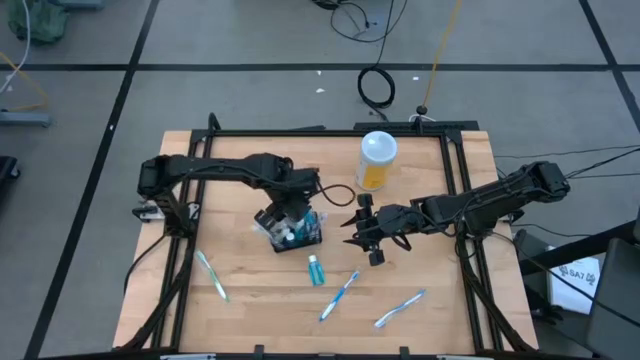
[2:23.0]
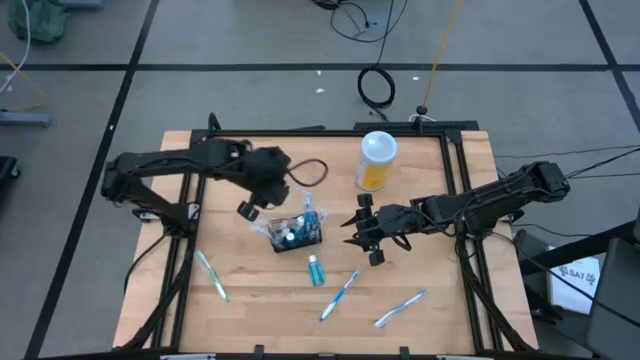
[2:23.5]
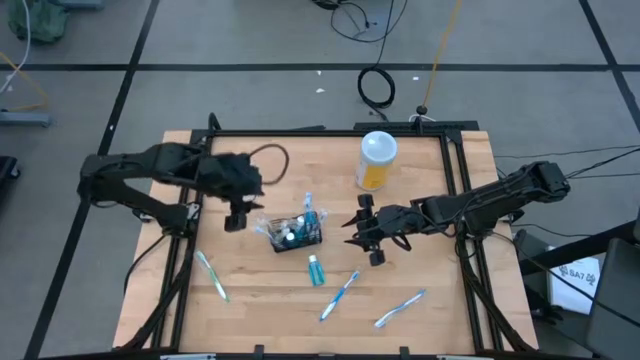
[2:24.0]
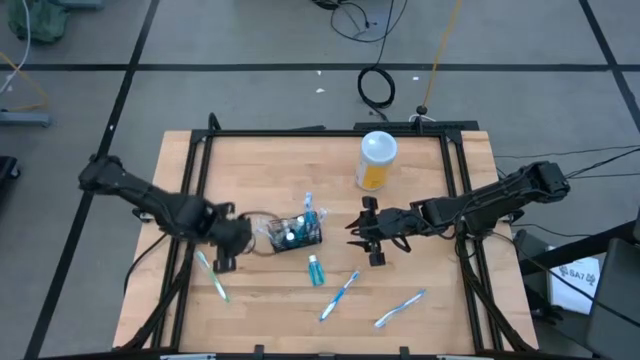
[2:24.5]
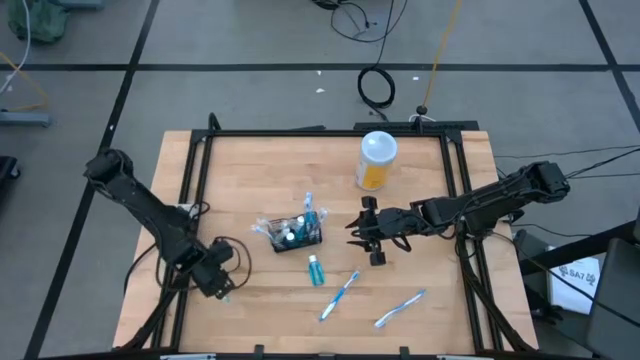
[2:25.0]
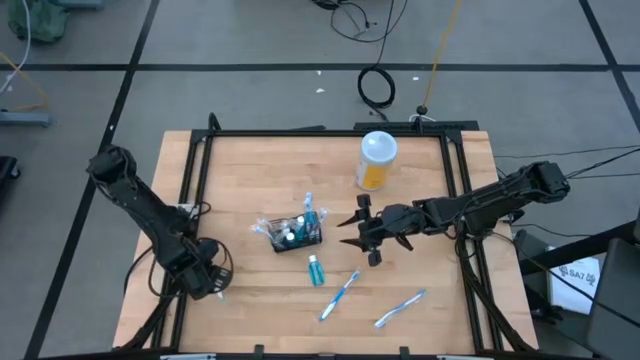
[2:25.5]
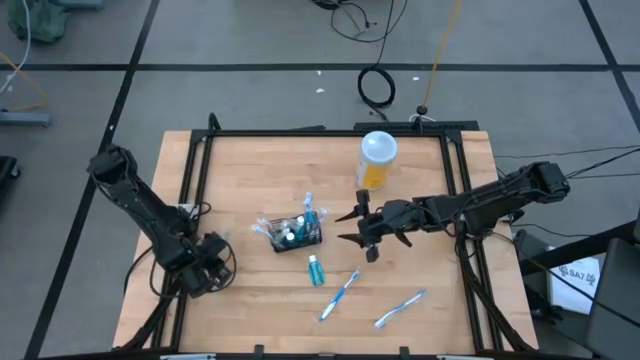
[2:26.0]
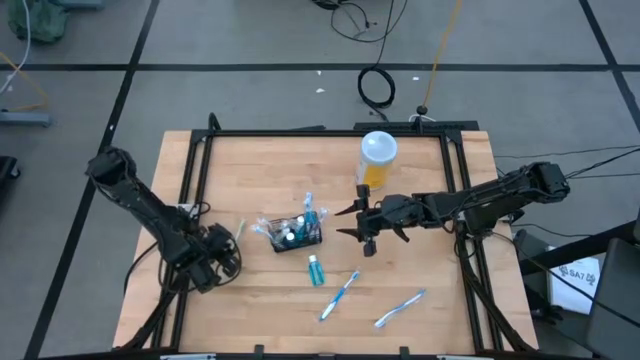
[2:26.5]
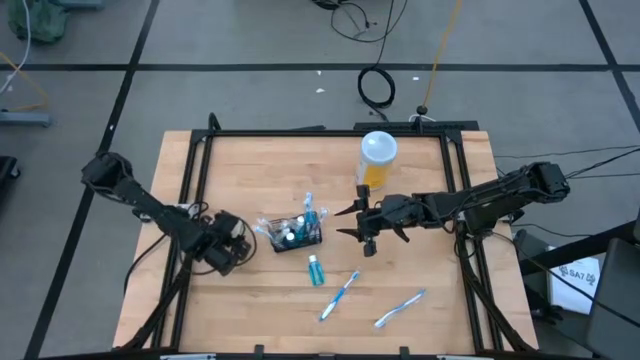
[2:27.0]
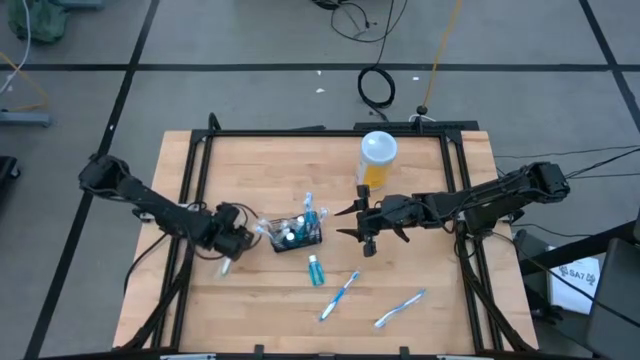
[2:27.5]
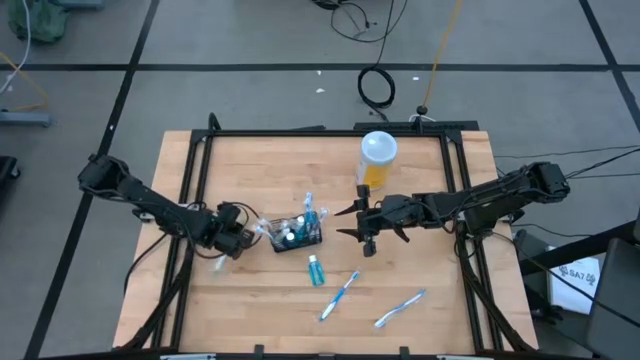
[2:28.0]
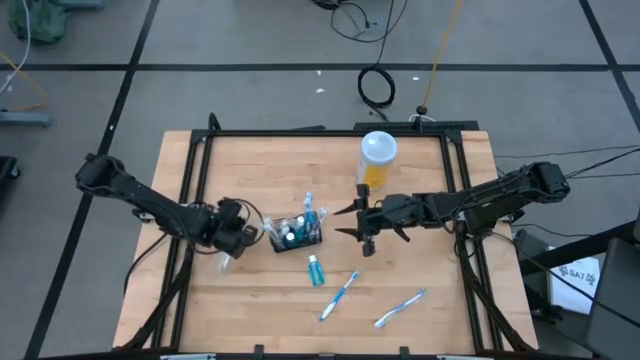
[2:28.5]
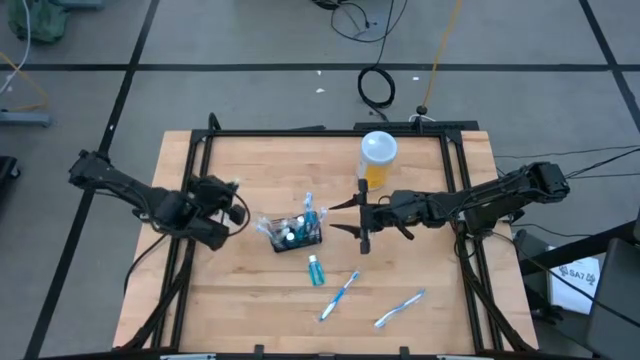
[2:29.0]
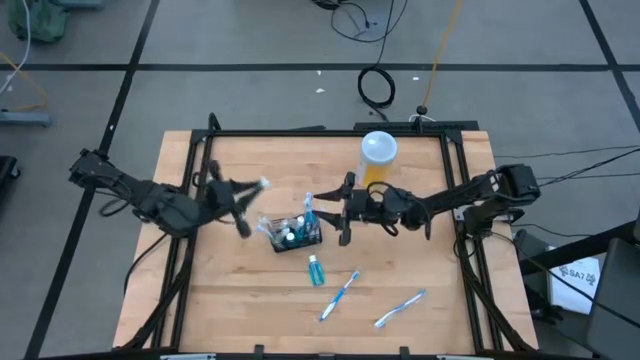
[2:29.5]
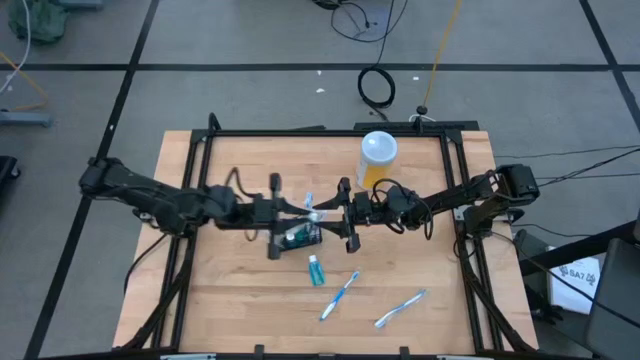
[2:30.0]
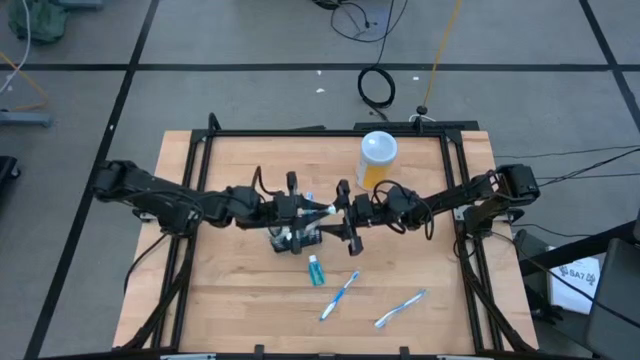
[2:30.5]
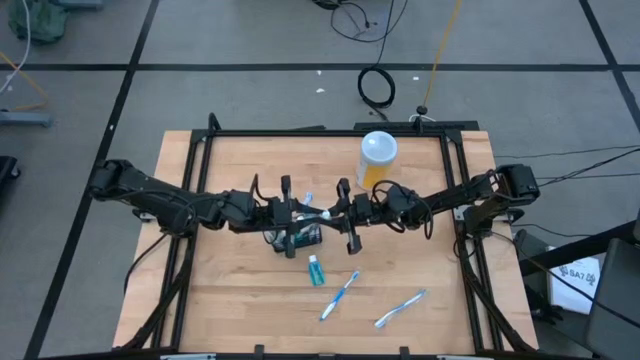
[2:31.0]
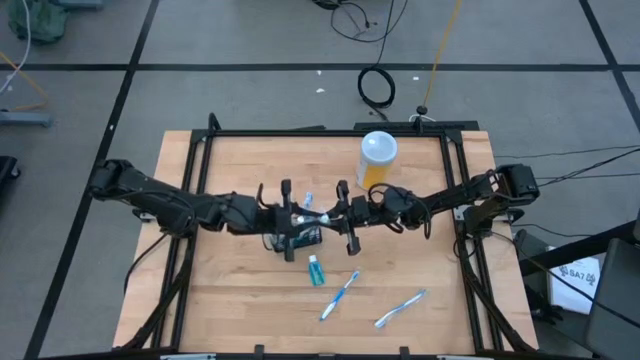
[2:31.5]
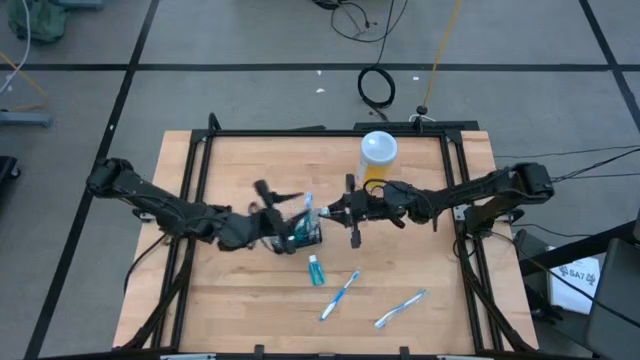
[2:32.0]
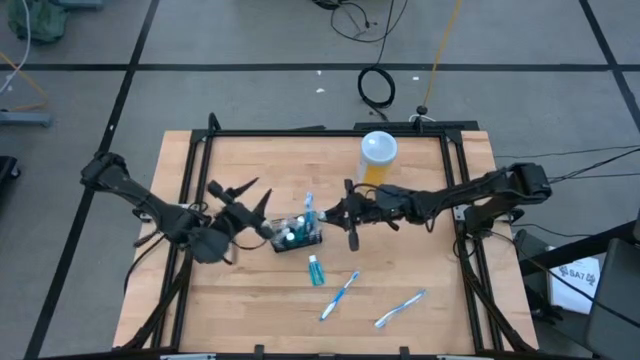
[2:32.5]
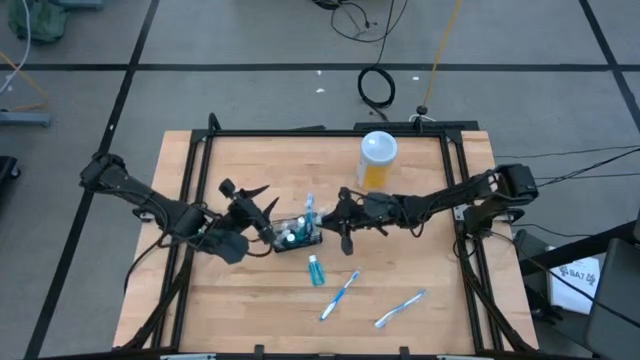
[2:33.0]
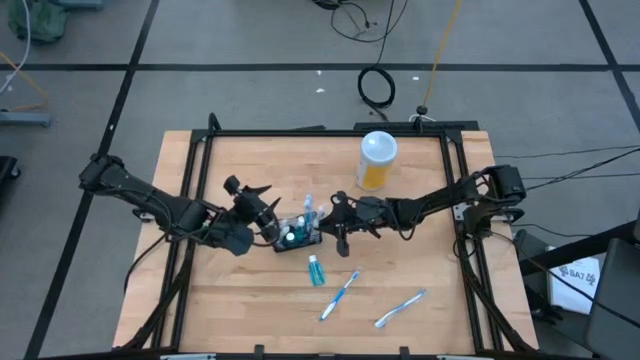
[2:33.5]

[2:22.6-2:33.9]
Task: Pick & Place toothbrushing station
Put the green toothbrush into the black wire organizer

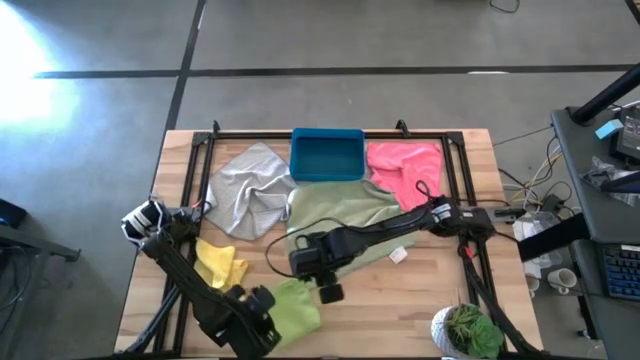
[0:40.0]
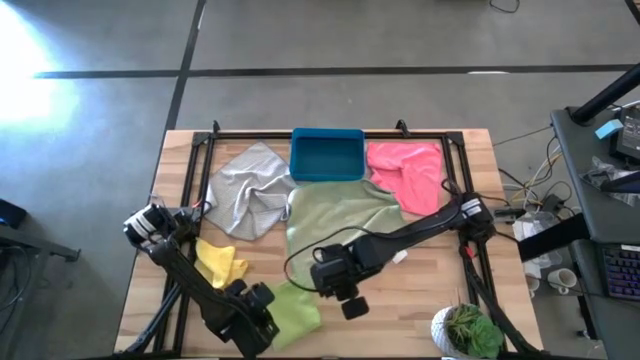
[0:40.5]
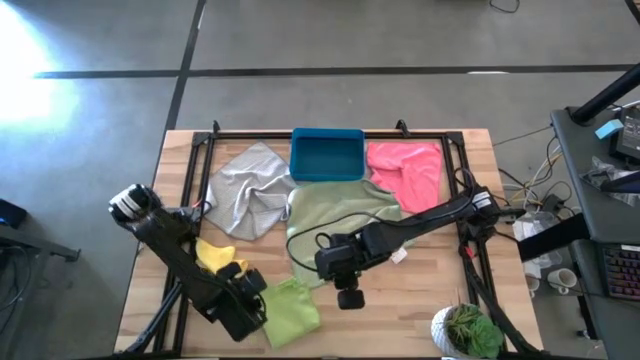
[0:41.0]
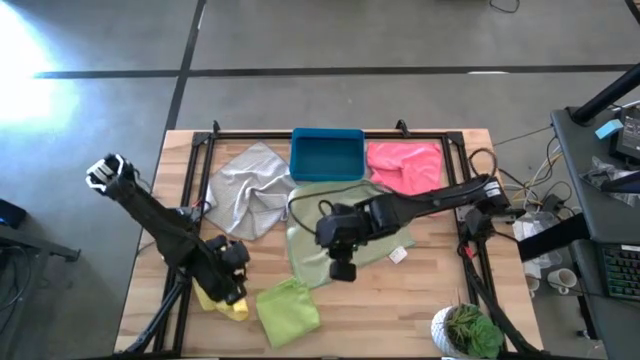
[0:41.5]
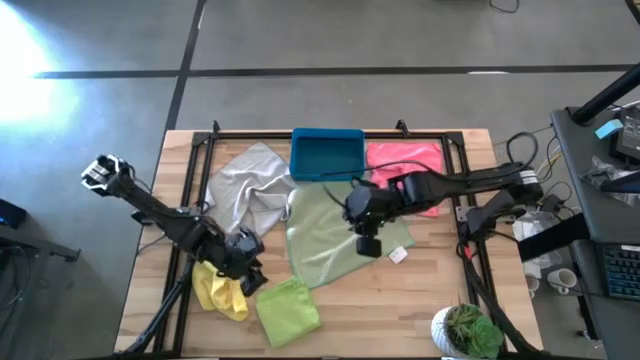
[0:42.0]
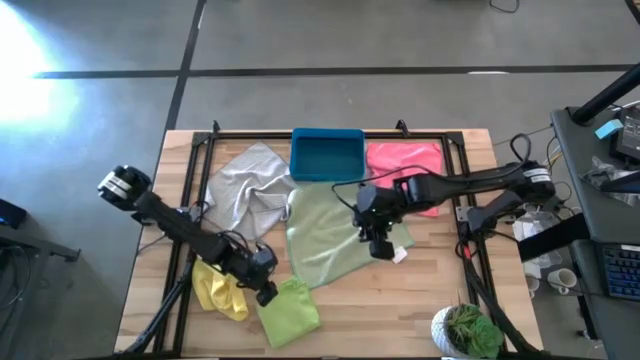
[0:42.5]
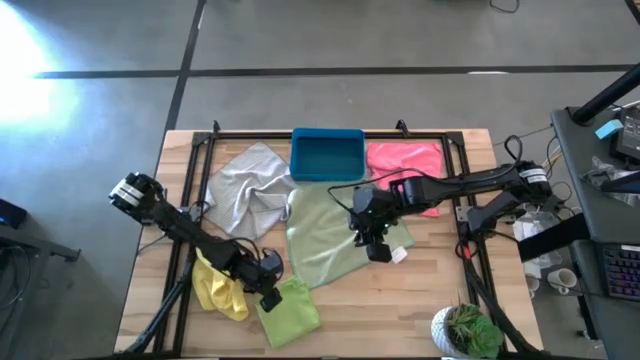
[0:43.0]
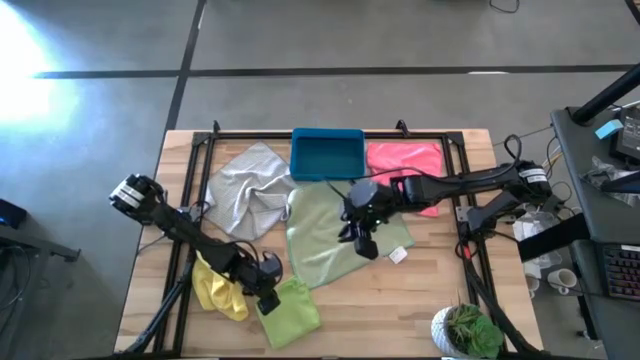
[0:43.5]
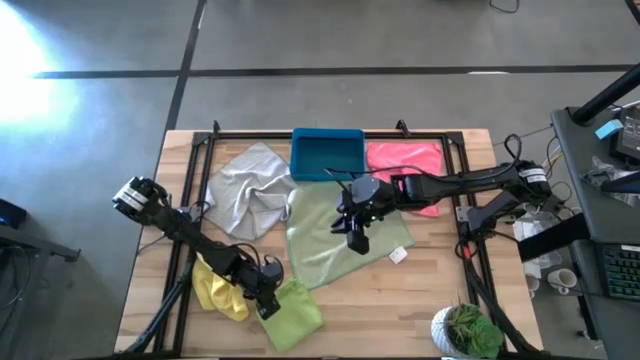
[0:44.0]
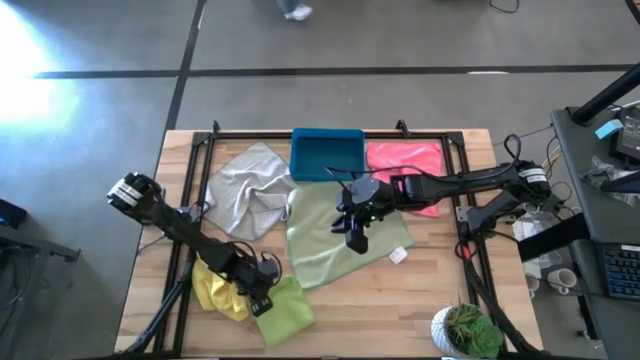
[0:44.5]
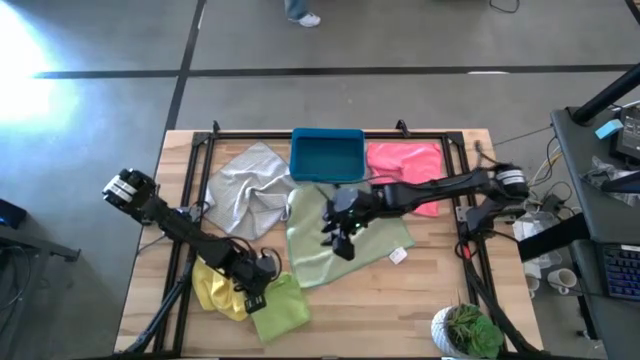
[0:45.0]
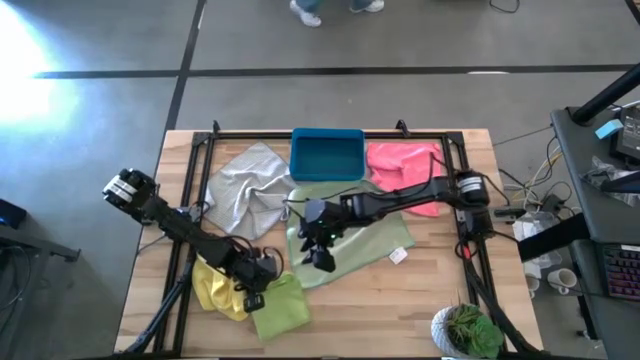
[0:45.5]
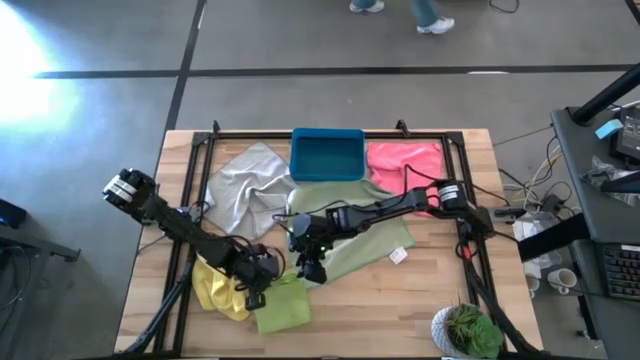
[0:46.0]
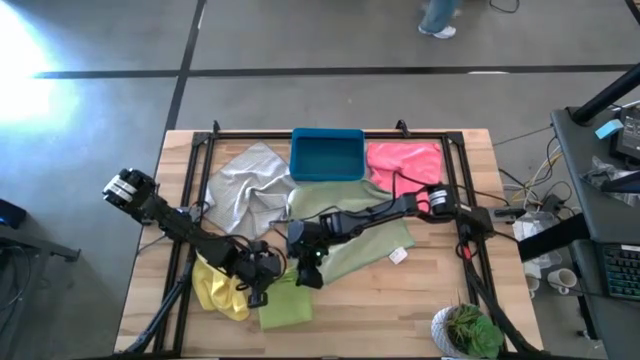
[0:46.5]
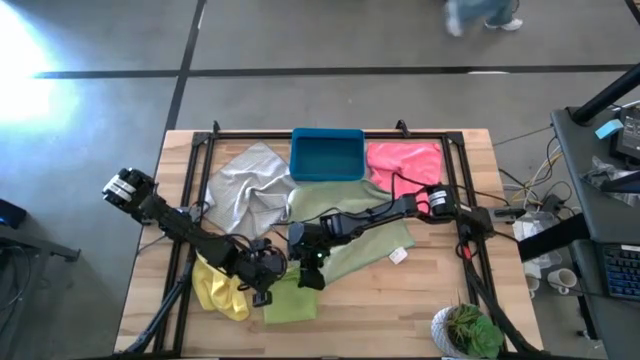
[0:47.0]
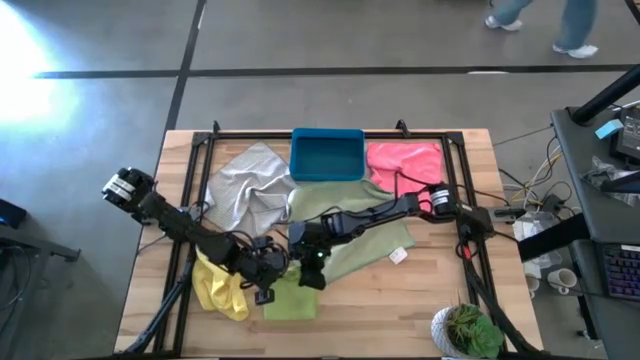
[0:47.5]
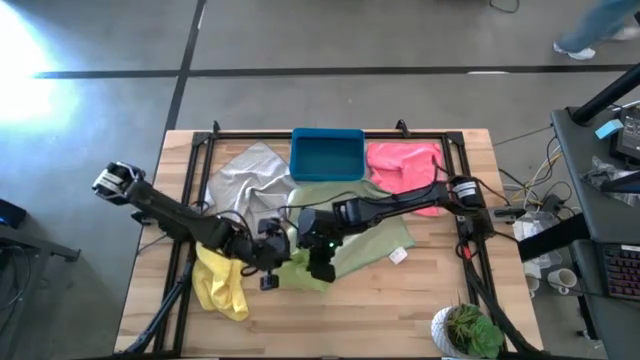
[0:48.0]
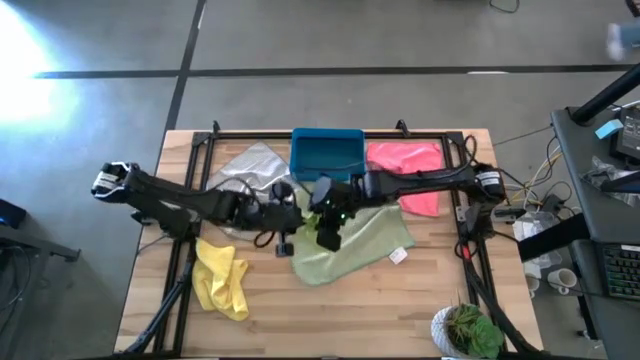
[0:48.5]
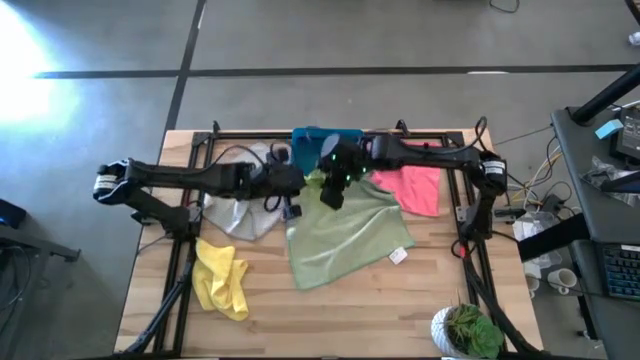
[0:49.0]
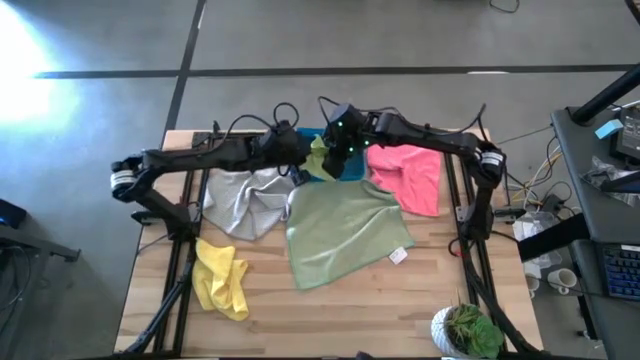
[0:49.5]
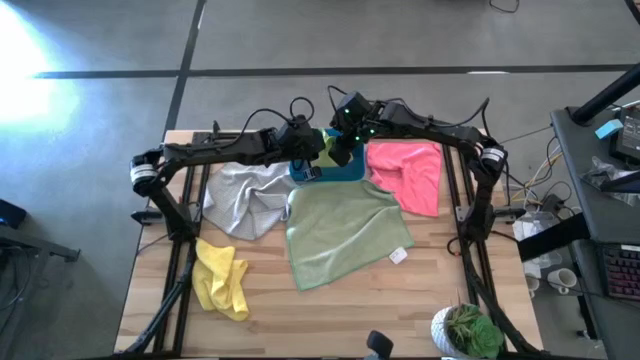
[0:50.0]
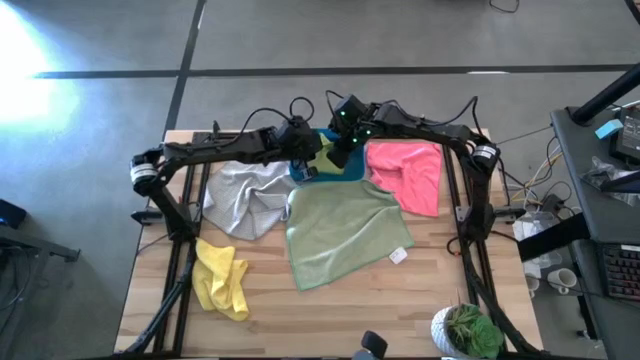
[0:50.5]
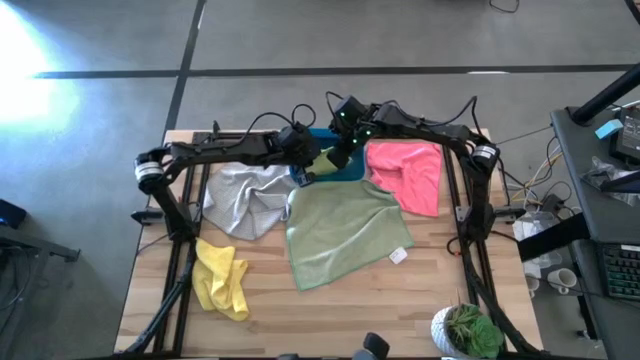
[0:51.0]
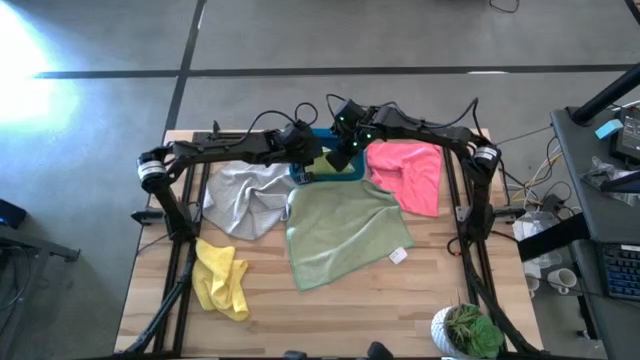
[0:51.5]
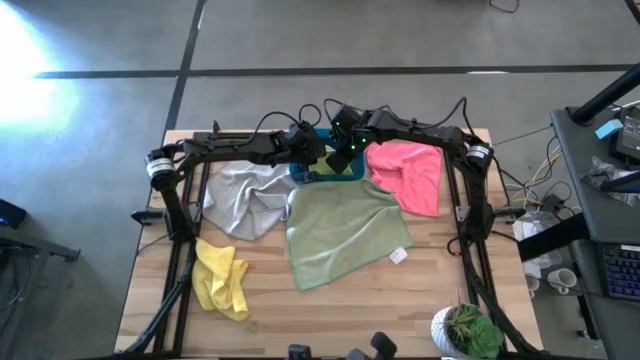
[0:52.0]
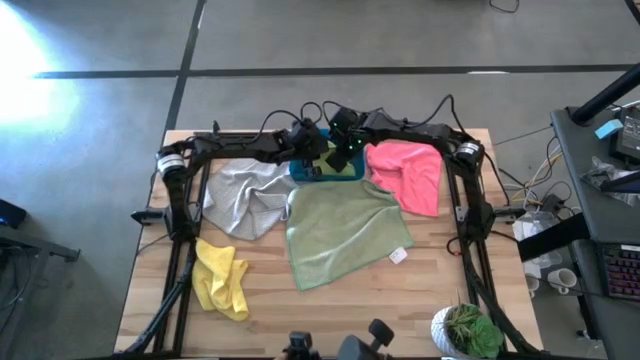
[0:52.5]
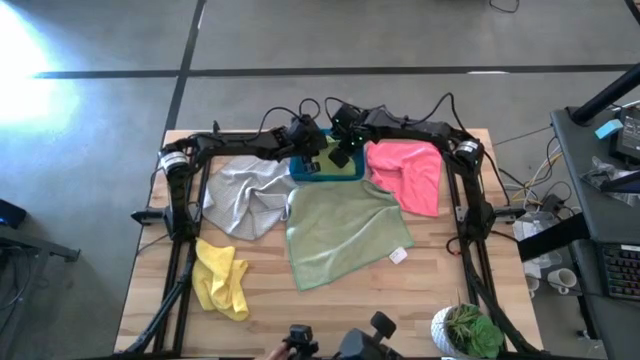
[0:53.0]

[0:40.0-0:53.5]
Task: Fold microfiber towels
Put the light green microfiber cloth into the blue bin
